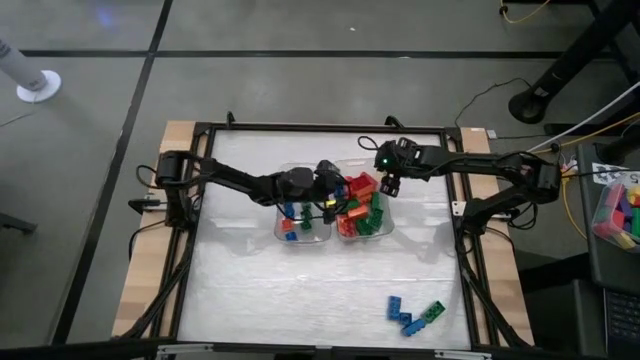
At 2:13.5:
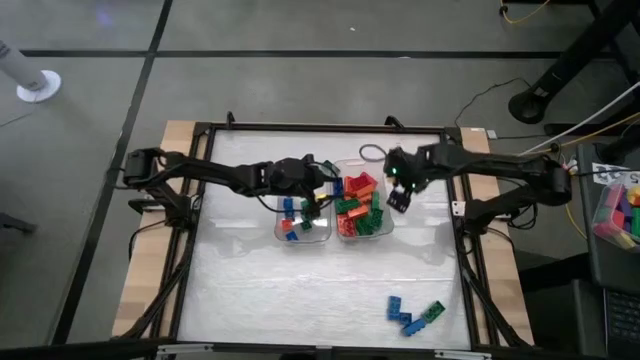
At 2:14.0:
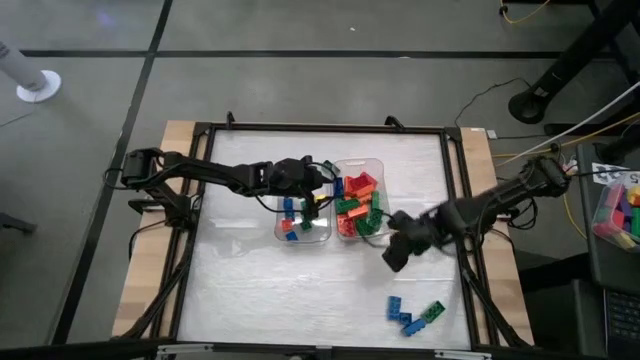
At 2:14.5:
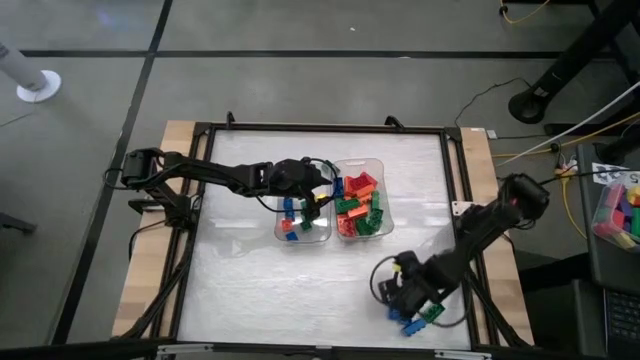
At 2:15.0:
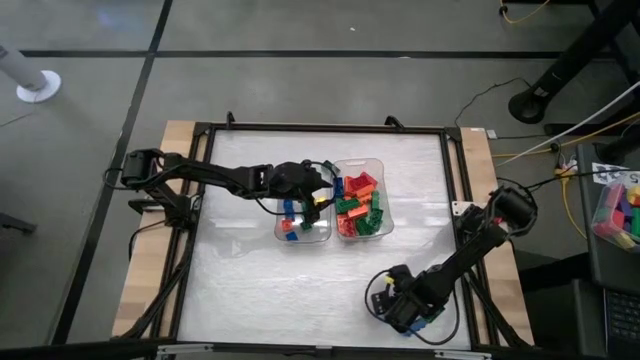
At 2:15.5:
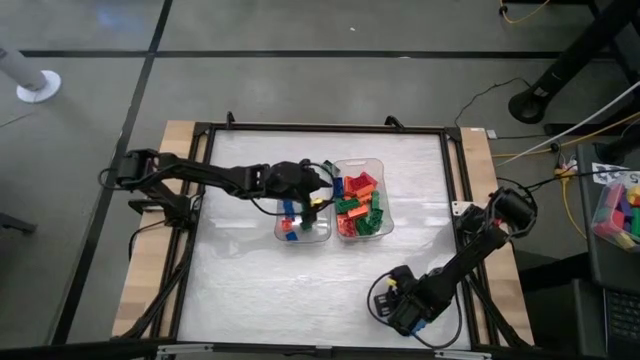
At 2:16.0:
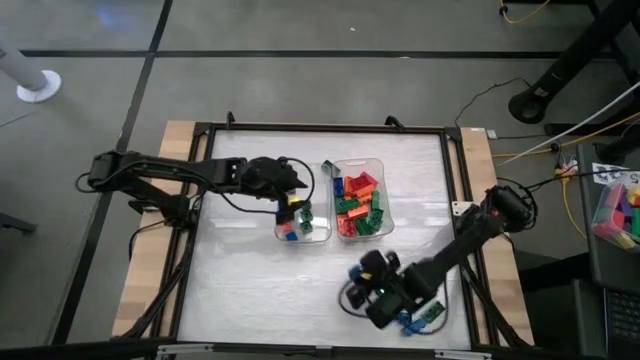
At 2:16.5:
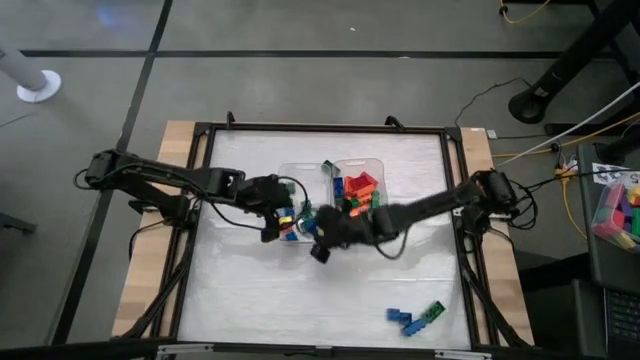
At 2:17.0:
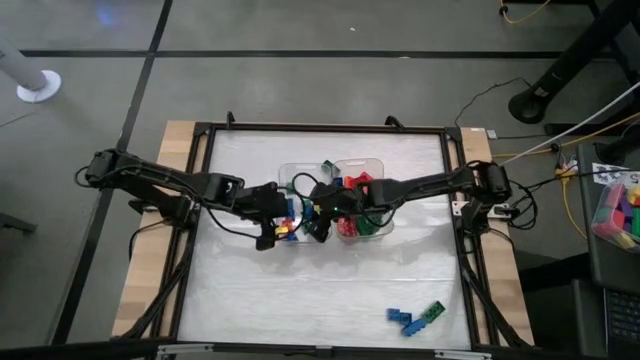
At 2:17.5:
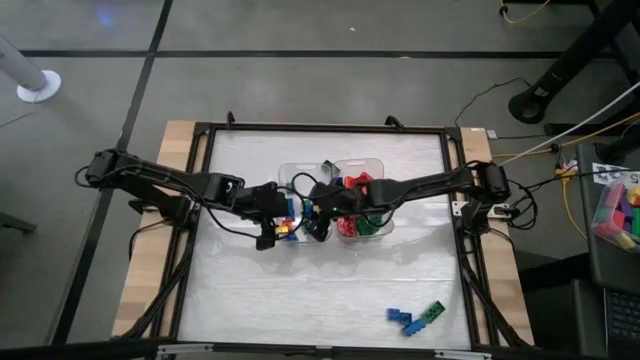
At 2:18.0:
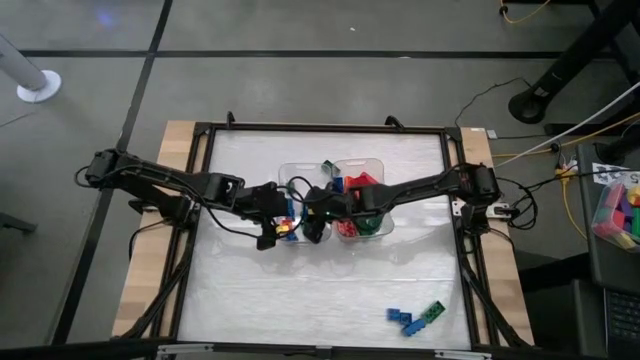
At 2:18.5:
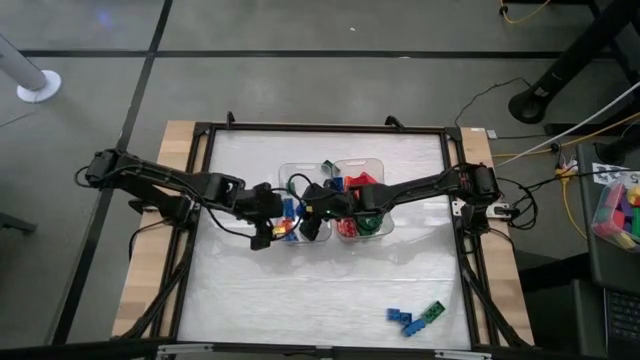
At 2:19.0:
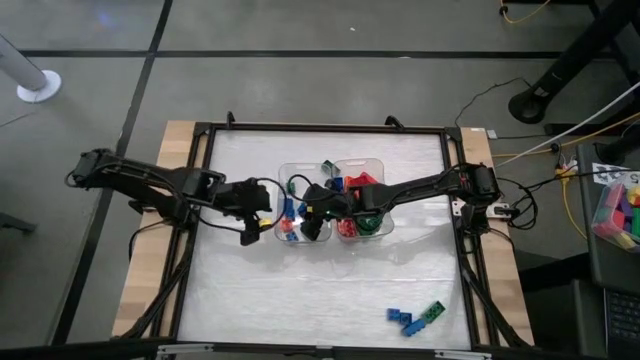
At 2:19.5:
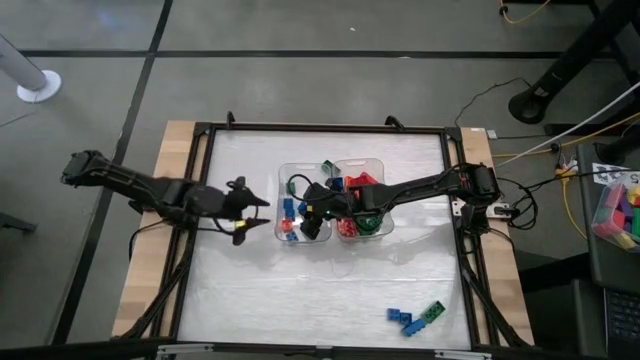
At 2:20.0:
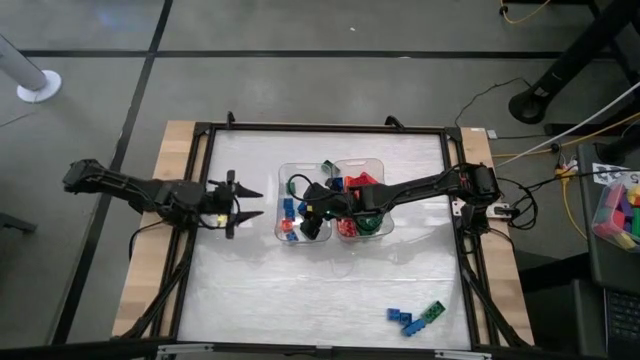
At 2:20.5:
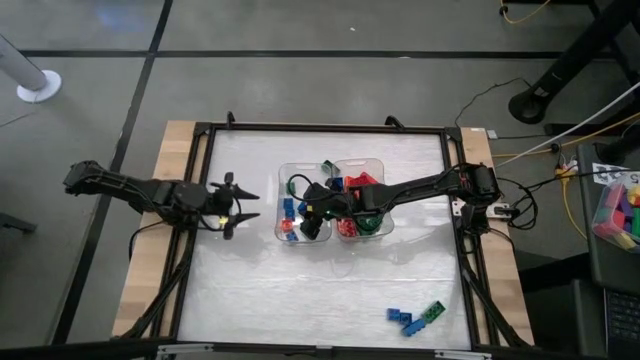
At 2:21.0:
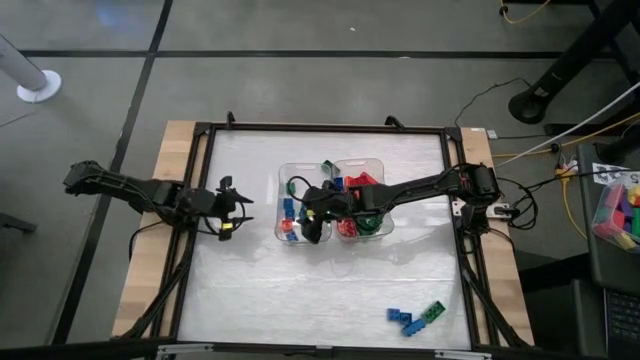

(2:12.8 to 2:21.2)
Task: Sort blocks by size
Put the blue square game piece into the left transparent bin

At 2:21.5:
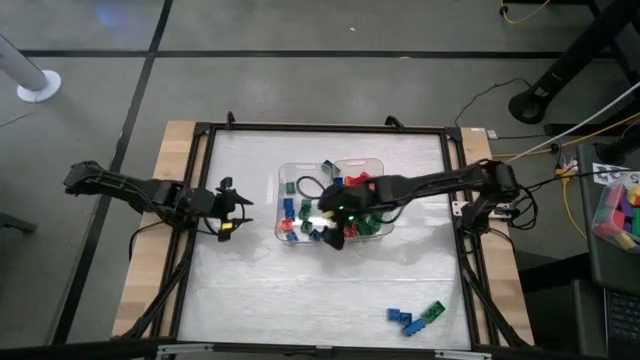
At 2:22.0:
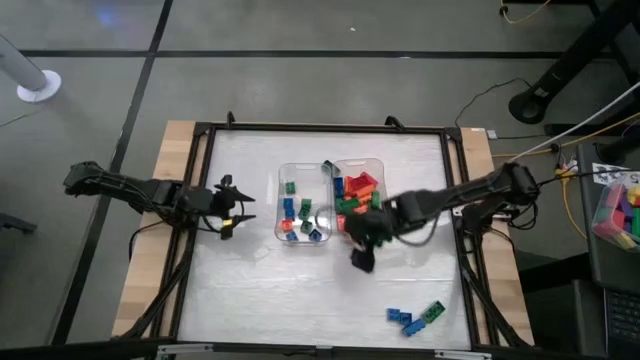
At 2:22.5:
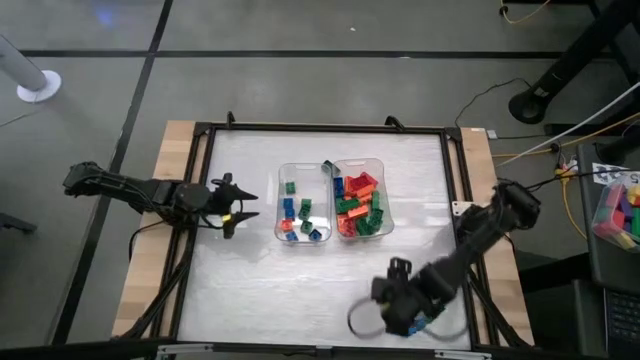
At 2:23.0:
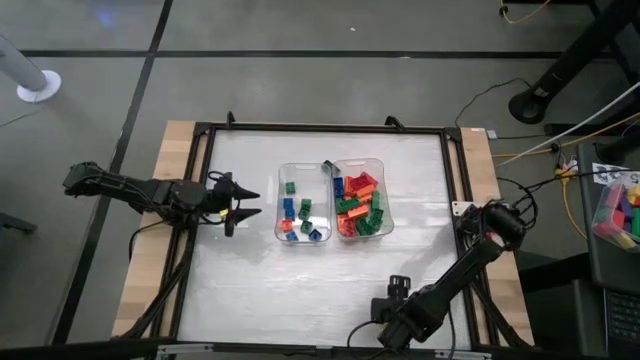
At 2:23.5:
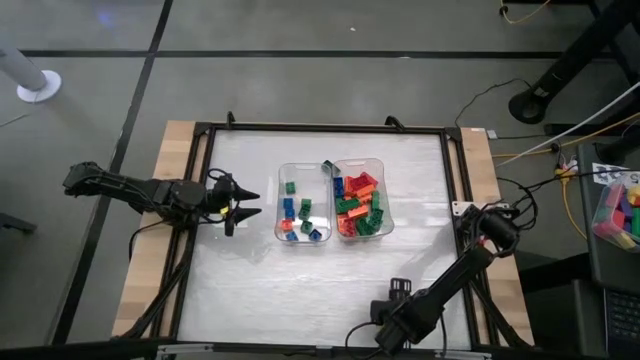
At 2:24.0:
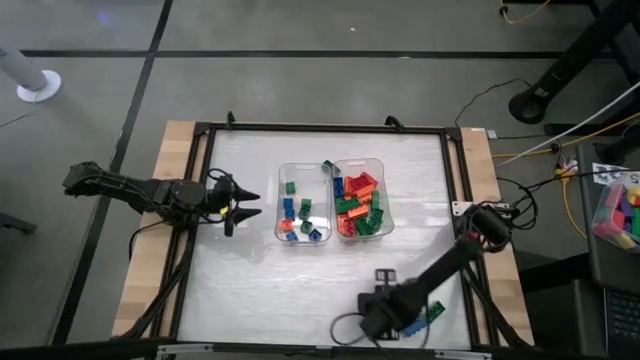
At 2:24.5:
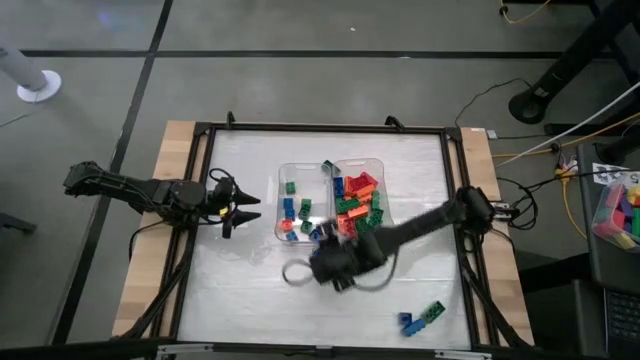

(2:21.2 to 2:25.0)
Put the blue square game piece into the left transparent bin

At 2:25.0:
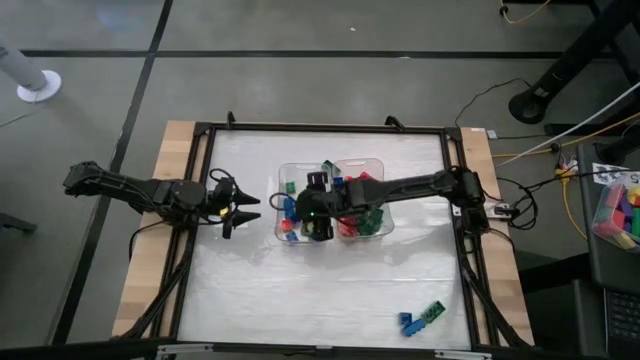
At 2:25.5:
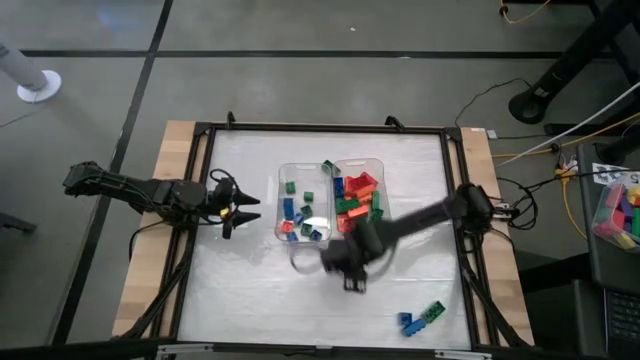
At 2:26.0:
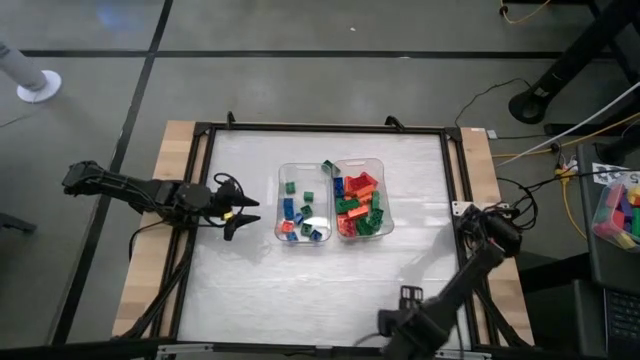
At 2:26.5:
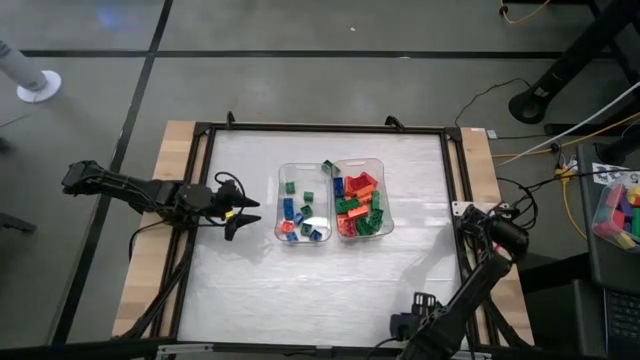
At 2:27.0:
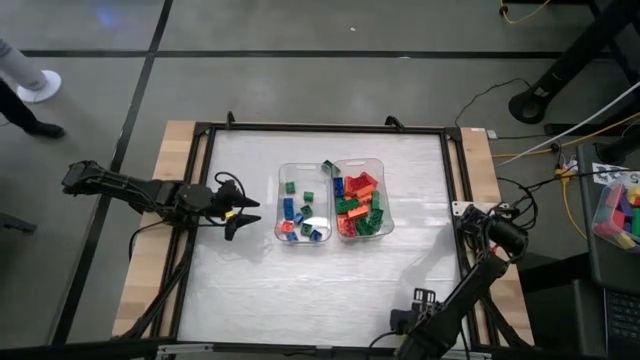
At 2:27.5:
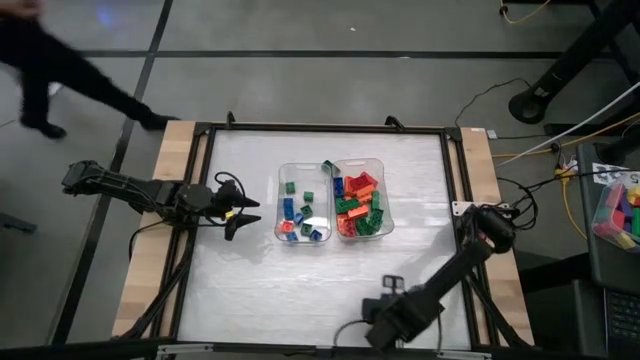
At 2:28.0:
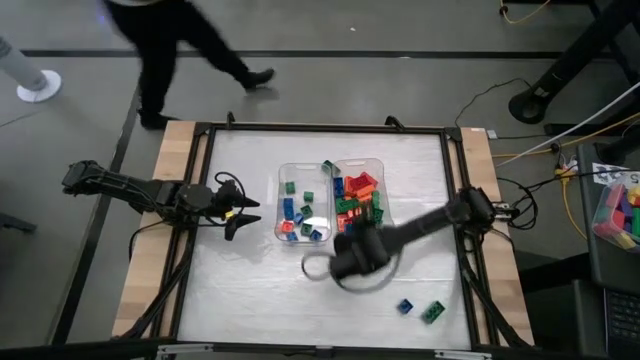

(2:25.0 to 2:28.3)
Put the blue rectangular game piece into the right transparent bin

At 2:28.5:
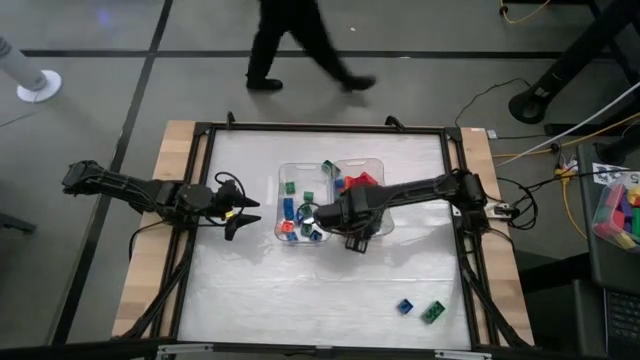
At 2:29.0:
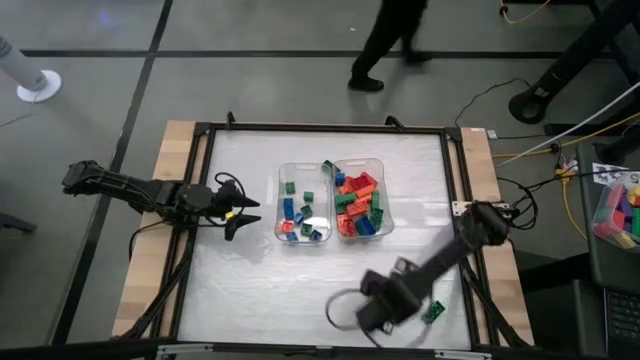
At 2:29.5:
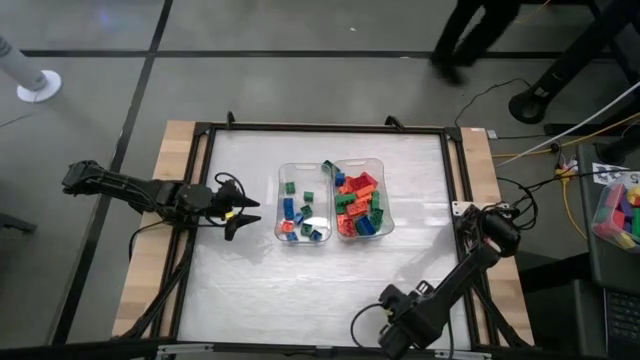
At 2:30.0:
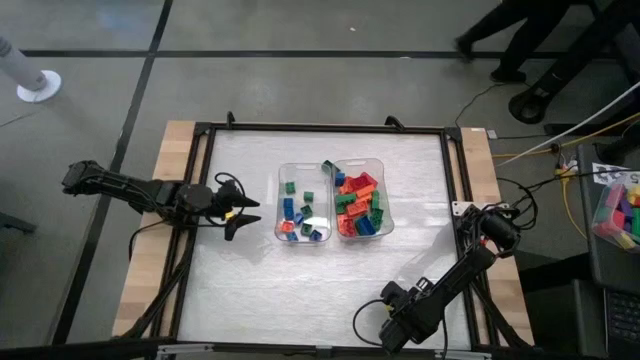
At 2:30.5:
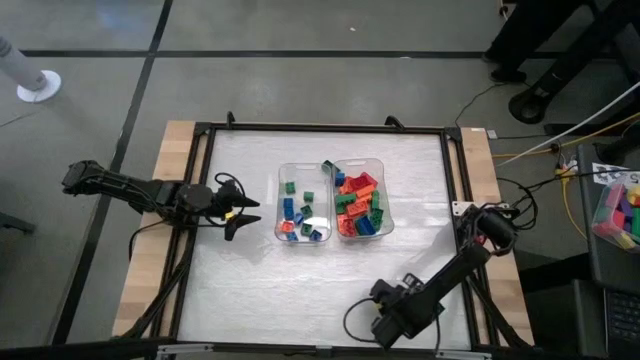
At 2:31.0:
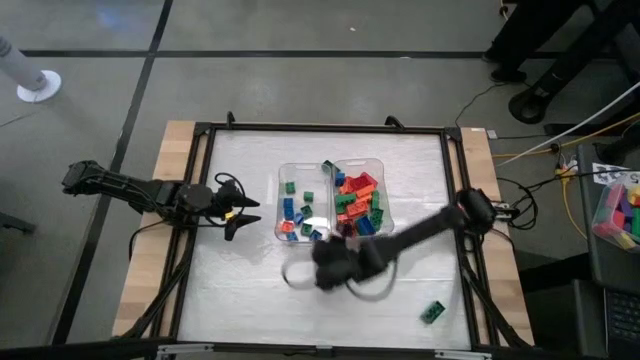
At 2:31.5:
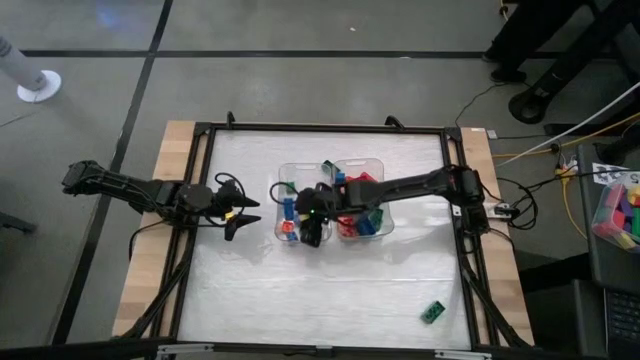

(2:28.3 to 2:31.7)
Put the blue square game piece into the left transparent bin

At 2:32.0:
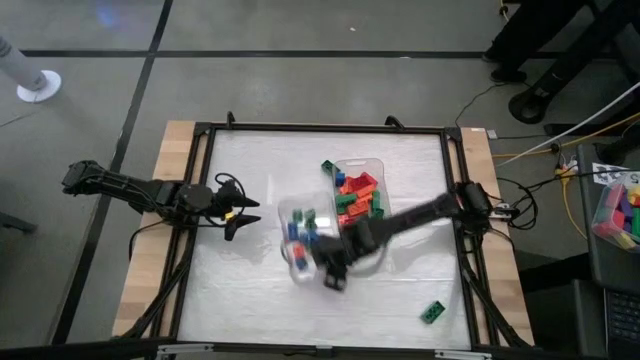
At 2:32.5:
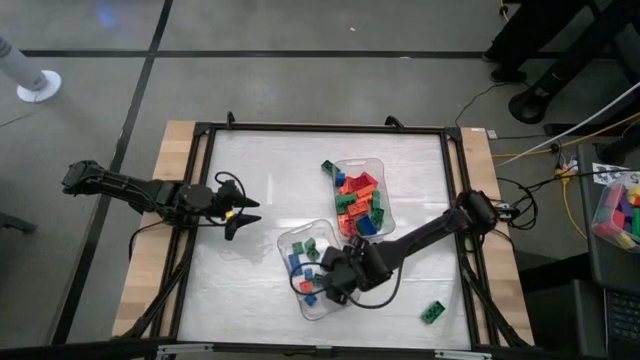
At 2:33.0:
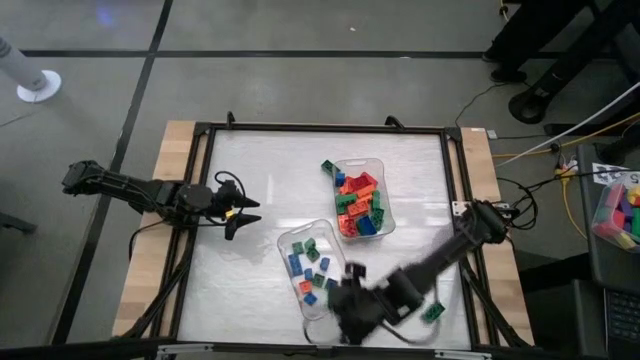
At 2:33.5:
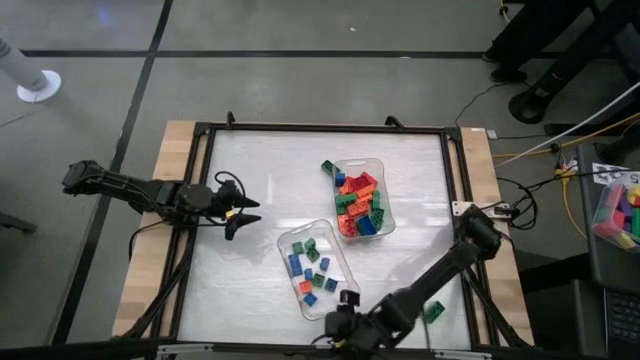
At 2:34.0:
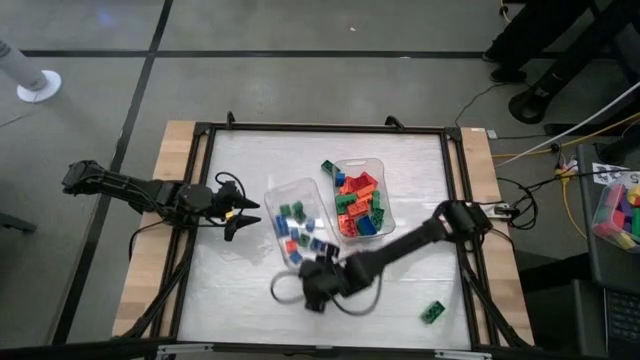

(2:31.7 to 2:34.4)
Adjust the left transparent bin
